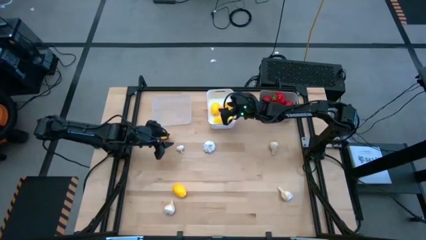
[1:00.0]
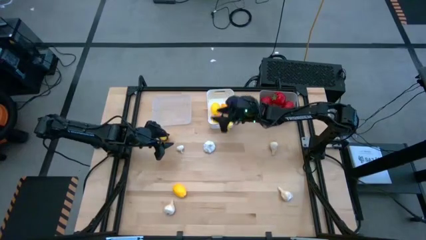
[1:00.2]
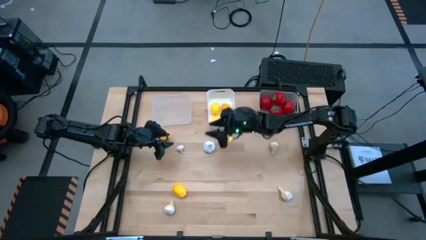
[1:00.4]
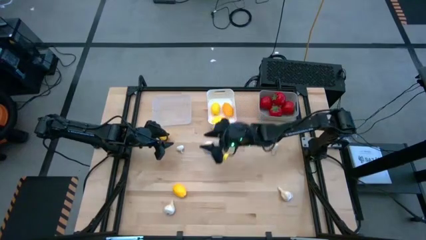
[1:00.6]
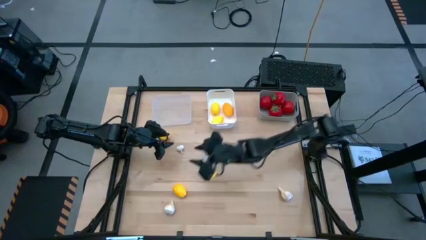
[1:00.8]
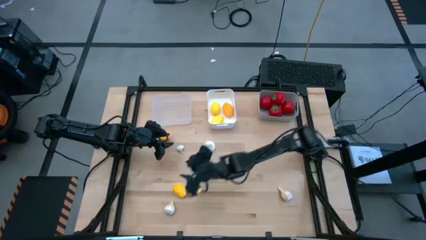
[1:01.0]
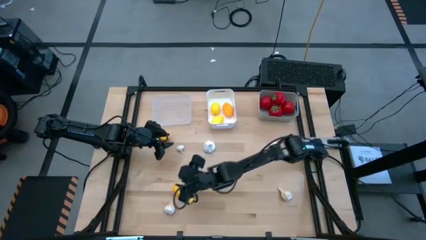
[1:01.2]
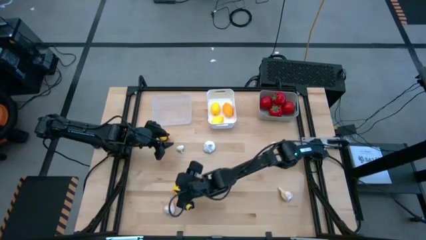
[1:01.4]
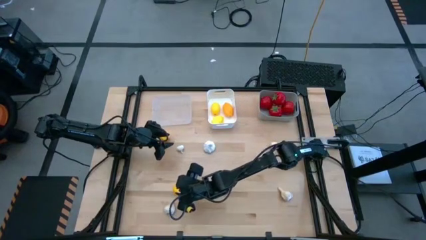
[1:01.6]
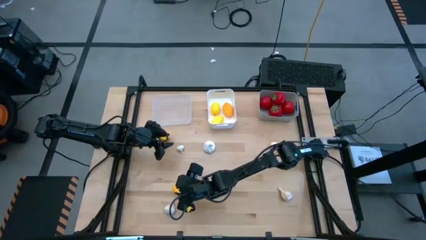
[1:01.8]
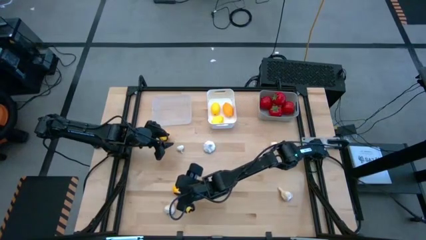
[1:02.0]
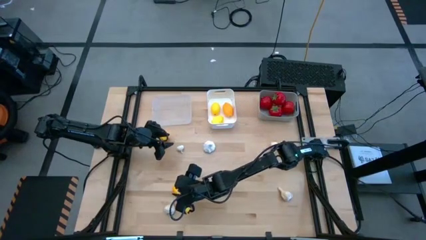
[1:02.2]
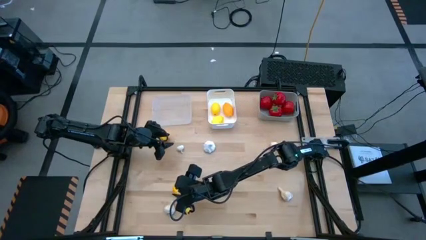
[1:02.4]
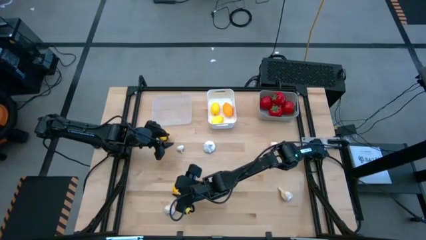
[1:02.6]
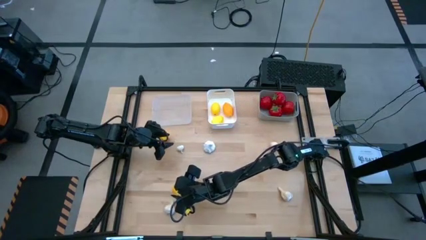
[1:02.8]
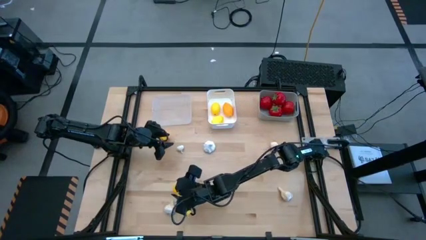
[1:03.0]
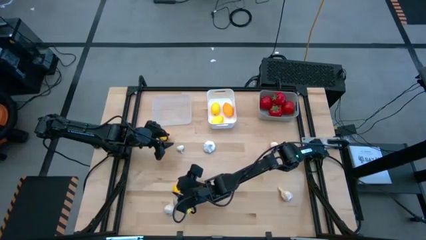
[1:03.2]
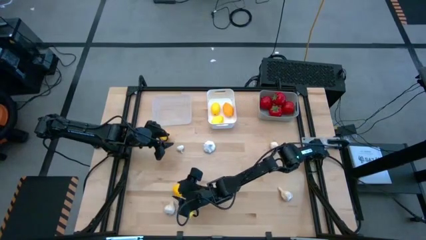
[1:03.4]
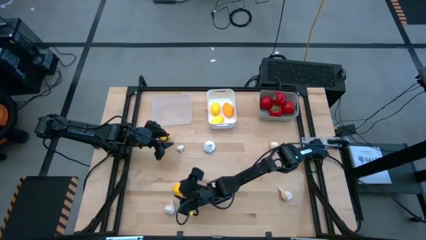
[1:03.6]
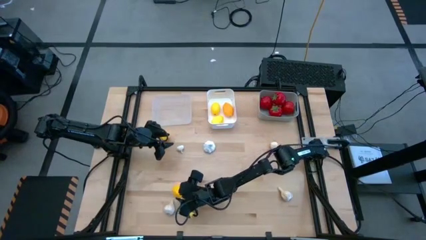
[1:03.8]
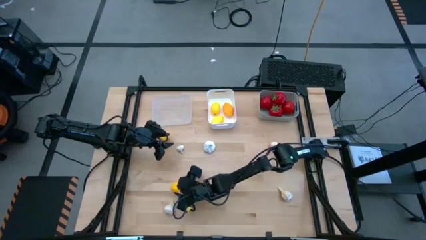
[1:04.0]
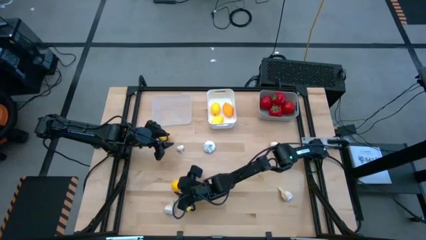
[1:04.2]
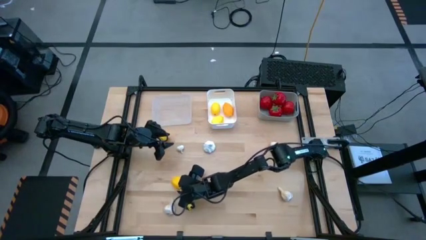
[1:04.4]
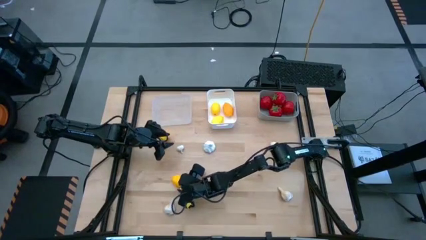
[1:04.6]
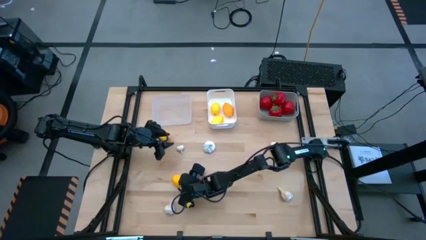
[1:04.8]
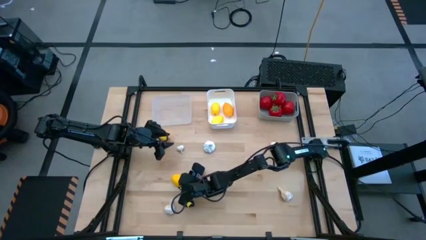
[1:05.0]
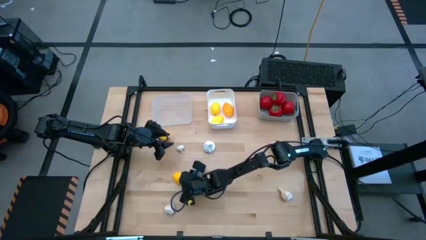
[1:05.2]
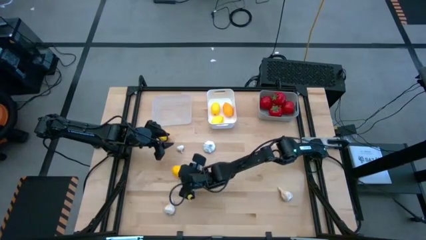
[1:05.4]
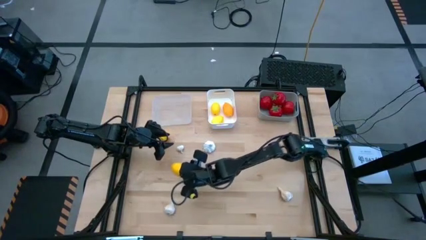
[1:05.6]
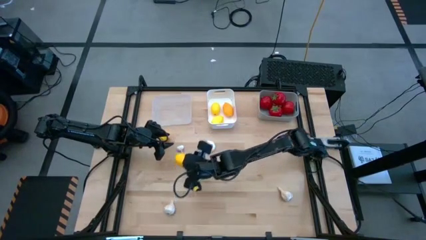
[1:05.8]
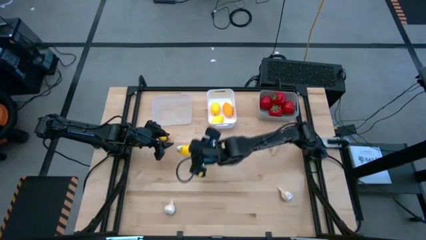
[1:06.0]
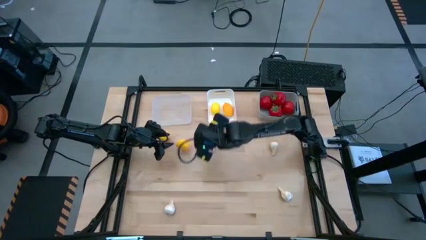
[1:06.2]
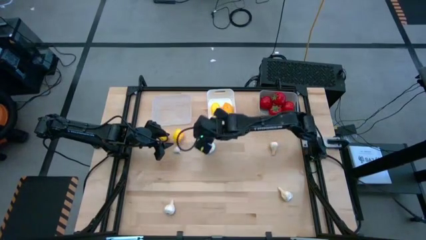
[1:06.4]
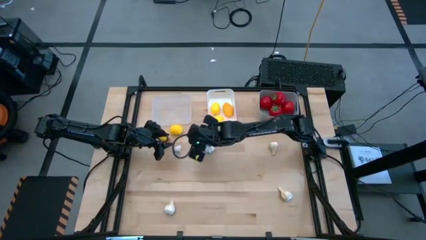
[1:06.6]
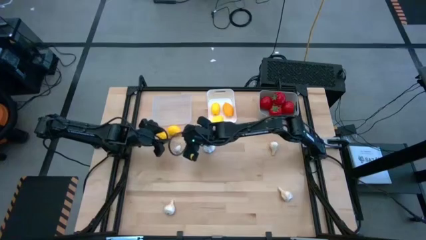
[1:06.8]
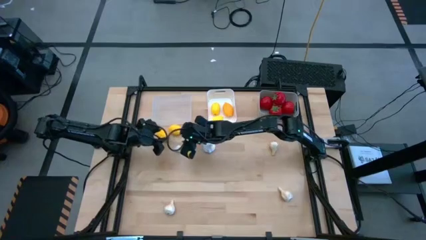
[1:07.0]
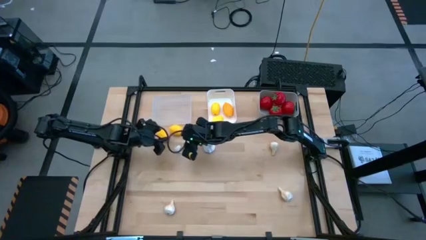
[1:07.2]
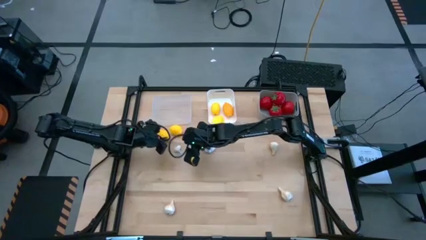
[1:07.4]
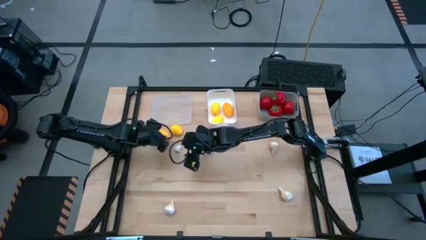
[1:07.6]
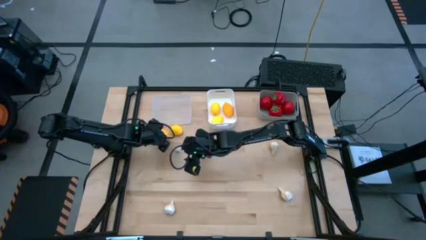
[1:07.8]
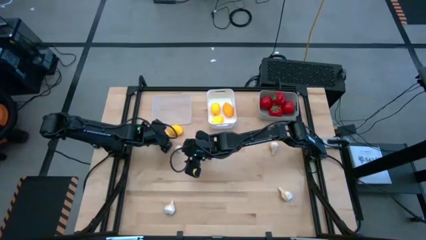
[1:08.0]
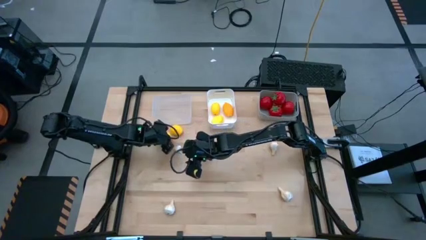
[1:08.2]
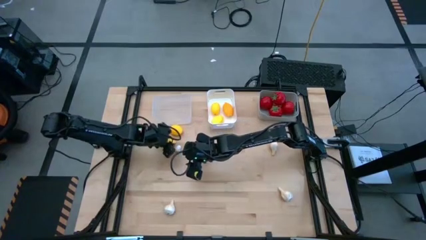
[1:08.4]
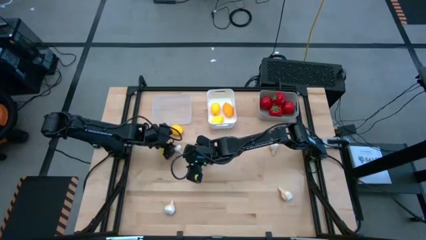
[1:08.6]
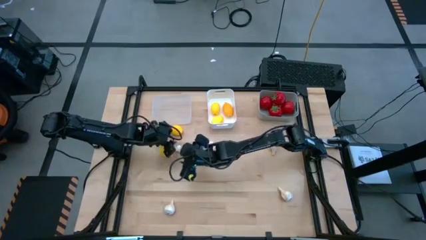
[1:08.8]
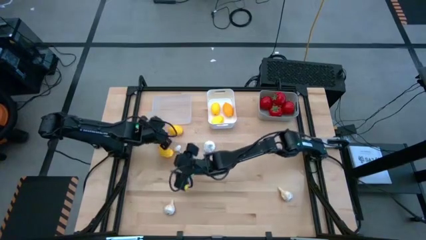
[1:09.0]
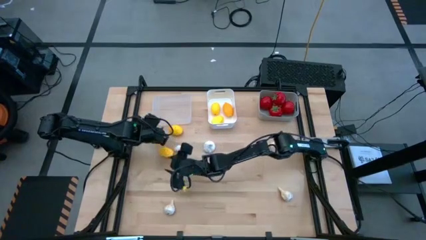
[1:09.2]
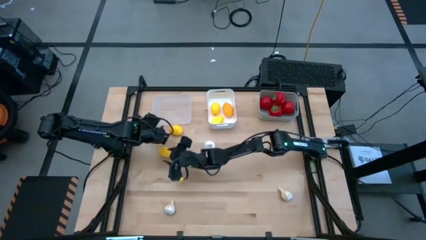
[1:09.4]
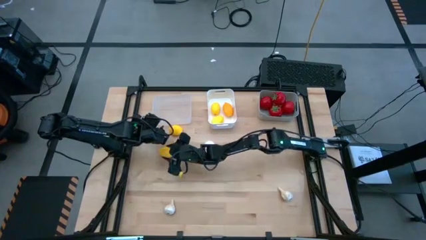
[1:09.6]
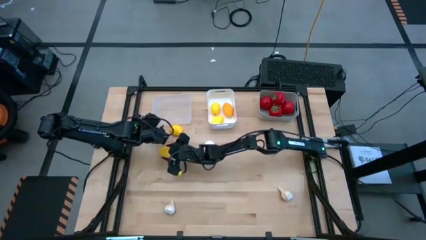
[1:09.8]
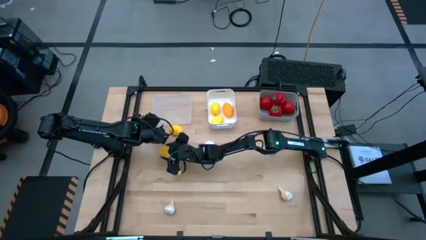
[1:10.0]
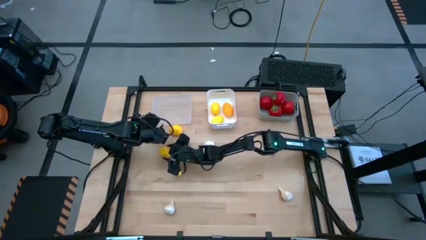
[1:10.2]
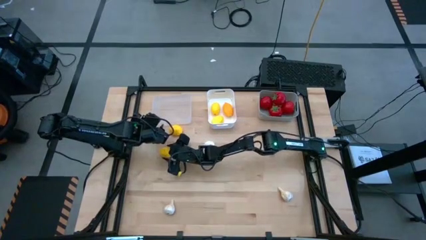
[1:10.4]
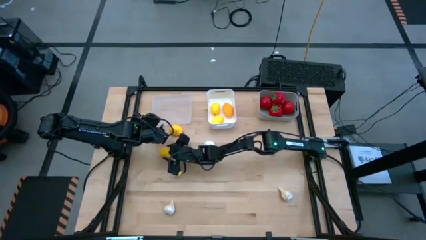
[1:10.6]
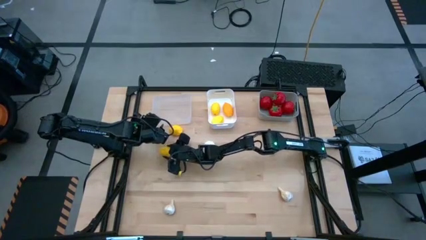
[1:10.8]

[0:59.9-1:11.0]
Task: Sort produce into baskets
Put the yellow lemon into the white bin

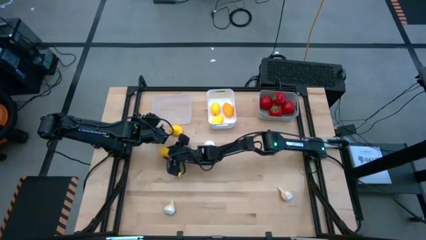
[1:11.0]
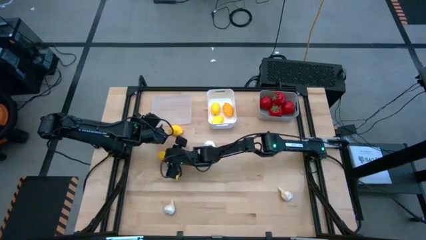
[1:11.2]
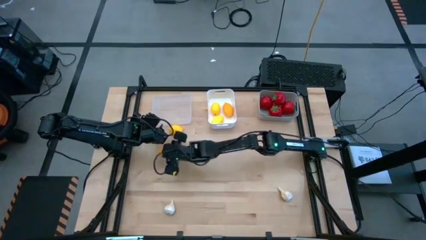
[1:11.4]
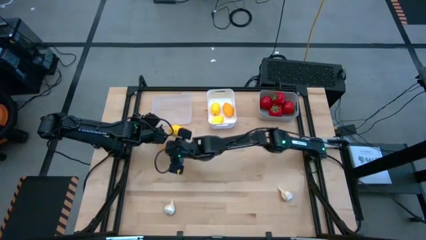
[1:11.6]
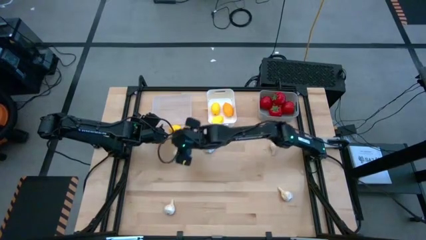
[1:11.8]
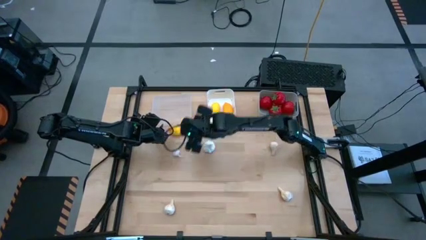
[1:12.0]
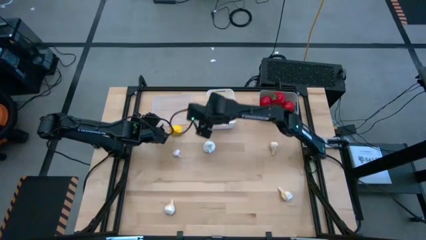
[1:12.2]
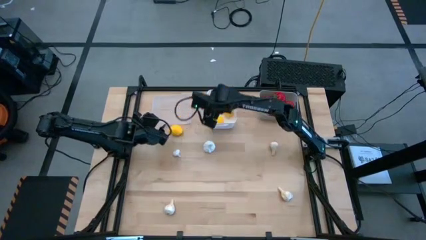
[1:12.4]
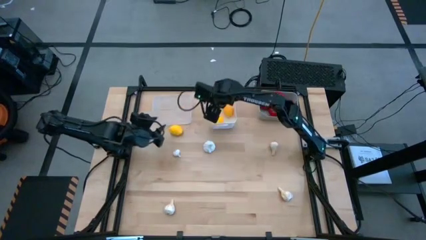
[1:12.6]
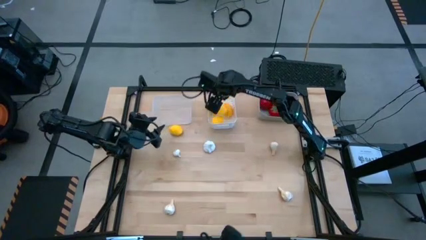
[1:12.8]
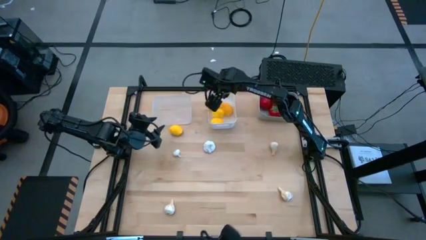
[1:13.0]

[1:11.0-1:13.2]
Put the yellow lemon into the white bin

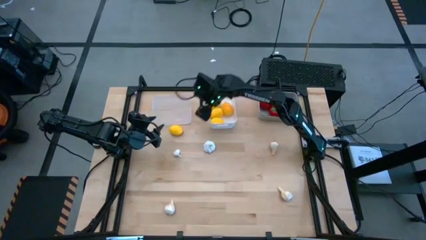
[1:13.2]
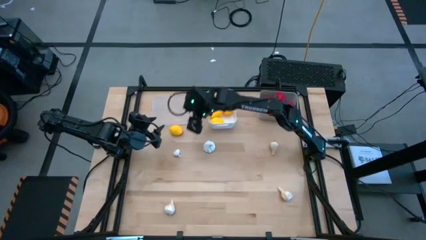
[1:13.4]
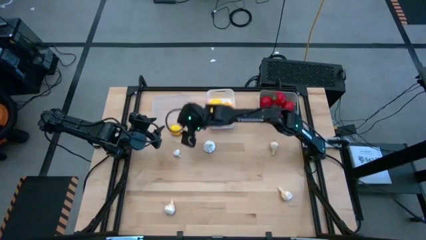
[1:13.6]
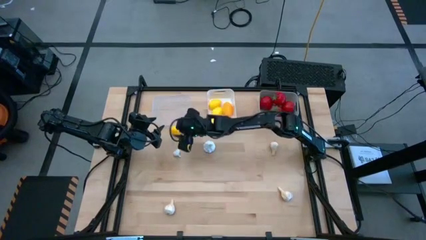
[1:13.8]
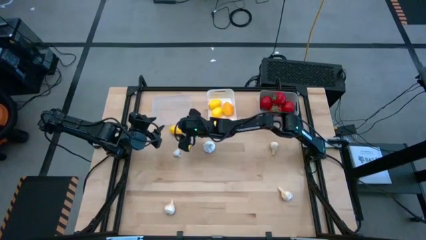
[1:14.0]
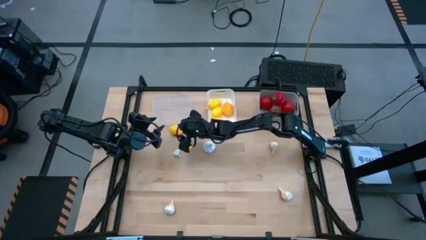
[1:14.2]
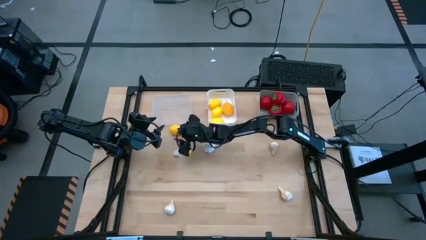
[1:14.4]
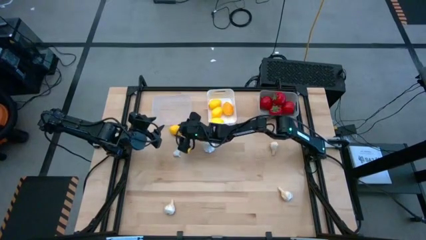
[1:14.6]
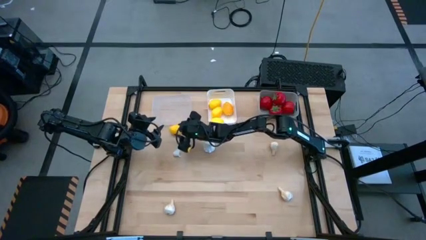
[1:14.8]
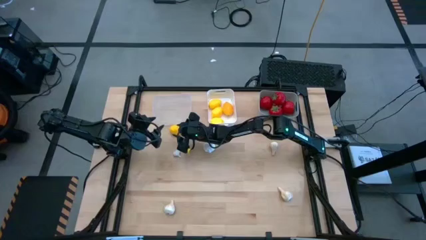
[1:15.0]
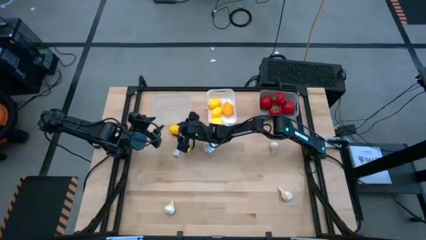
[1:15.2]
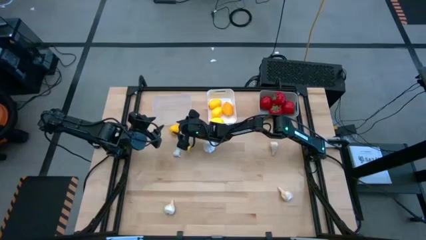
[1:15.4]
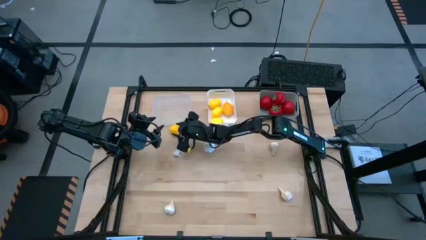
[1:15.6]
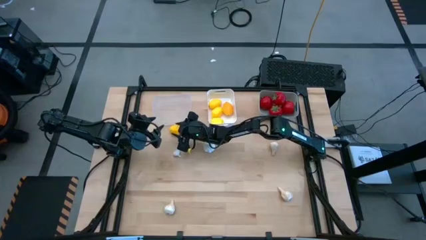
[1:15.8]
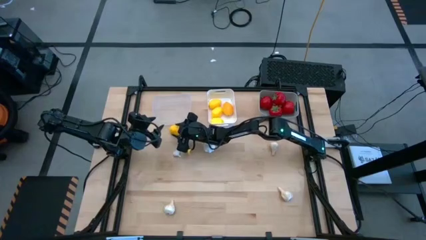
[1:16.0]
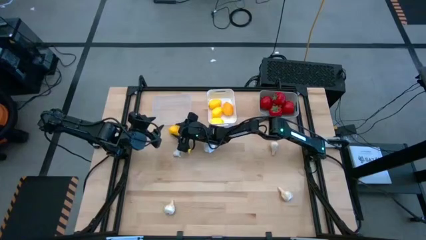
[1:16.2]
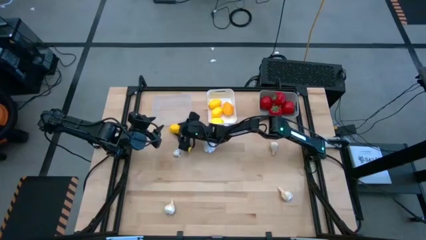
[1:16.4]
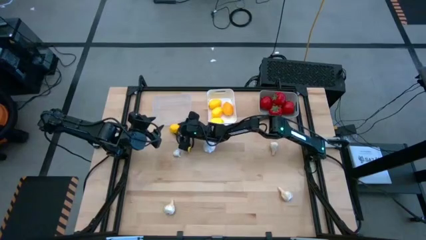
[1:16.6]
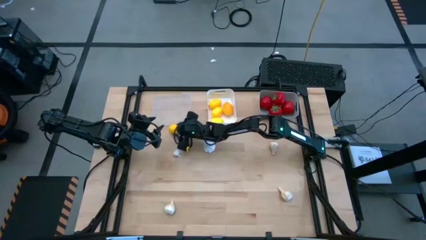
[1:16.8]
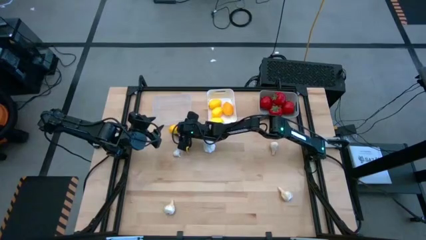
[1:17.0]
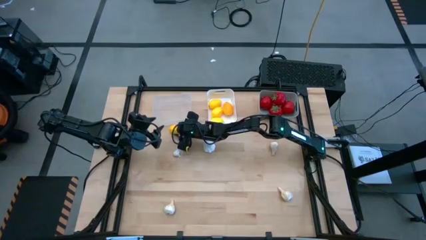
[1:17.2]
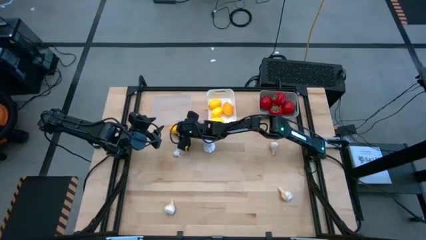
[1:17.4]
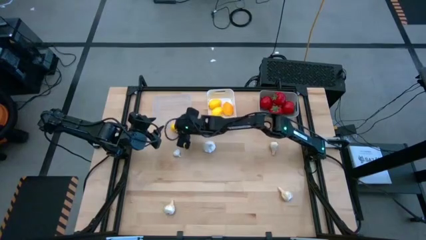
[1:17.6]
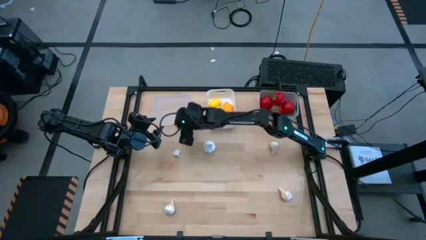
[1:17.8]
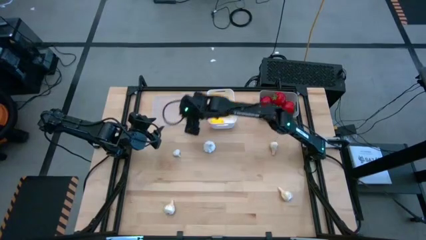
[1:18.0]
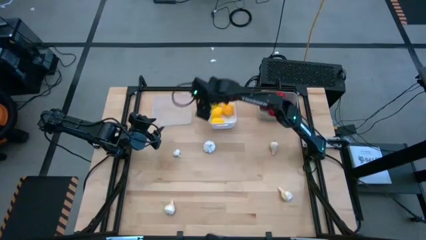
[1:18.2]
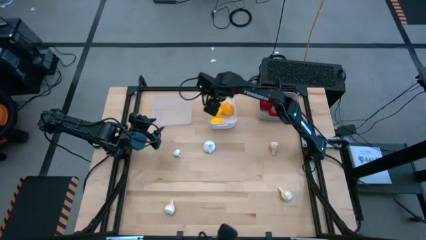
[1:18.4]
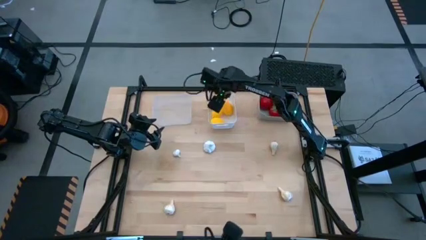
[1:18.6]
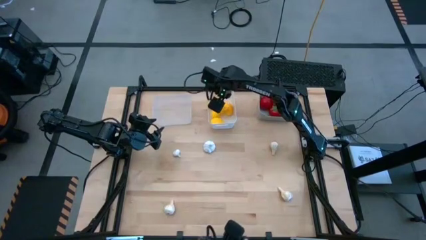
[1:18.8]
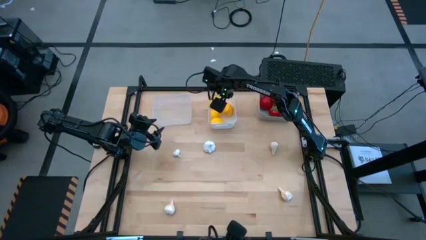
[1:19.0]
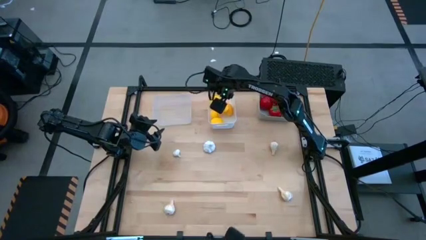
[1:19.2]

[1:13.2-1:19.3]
Put the yellow lemon into the white bin
